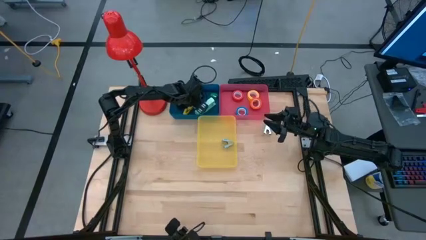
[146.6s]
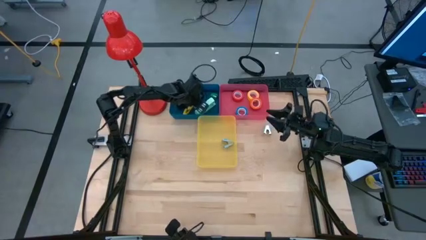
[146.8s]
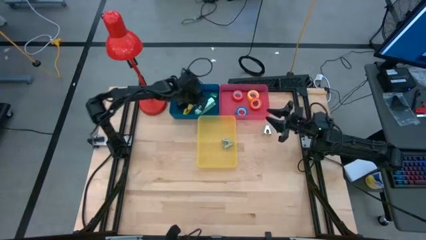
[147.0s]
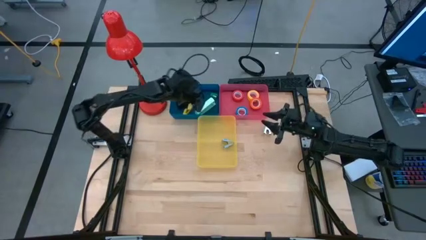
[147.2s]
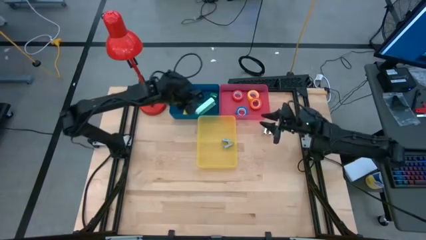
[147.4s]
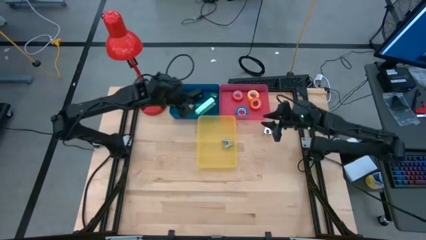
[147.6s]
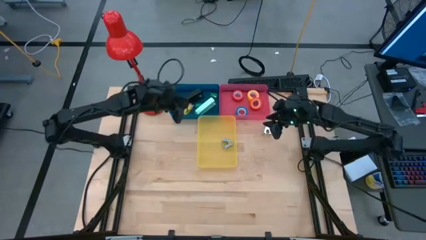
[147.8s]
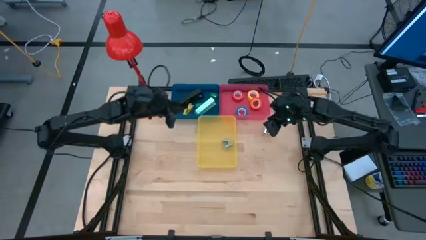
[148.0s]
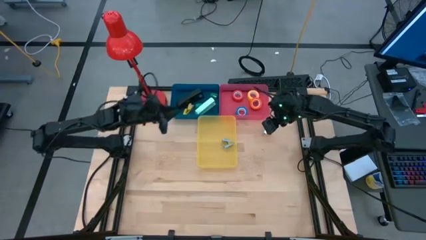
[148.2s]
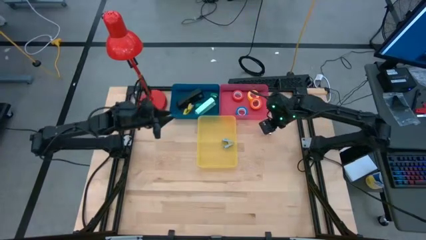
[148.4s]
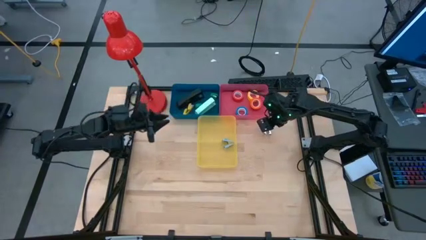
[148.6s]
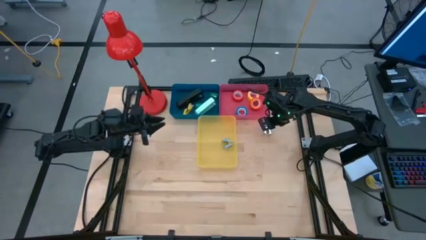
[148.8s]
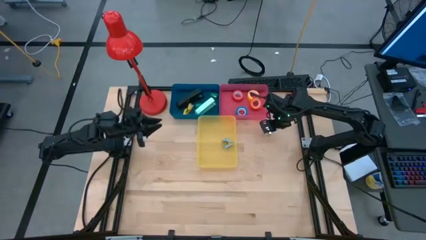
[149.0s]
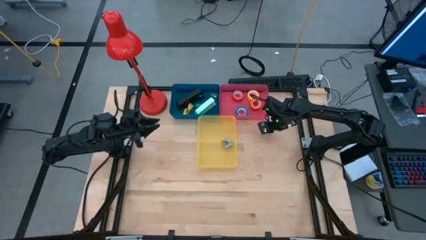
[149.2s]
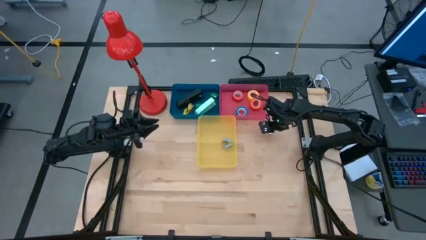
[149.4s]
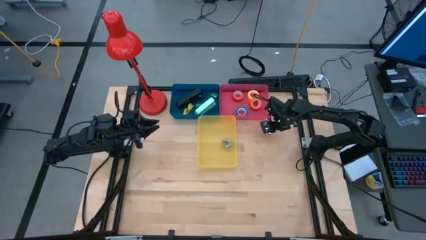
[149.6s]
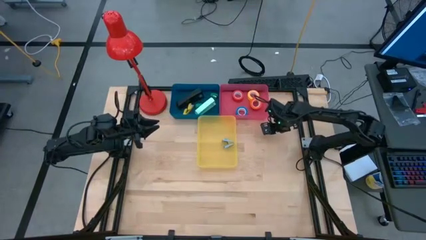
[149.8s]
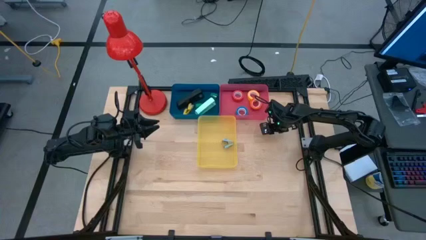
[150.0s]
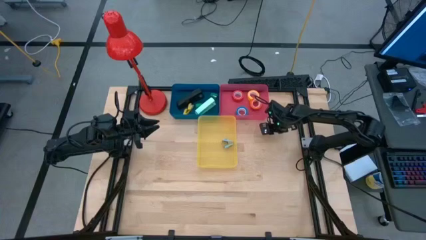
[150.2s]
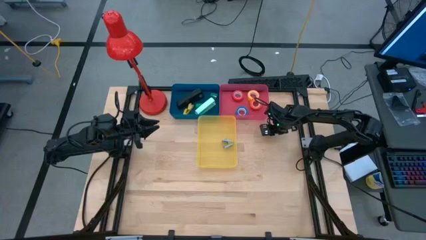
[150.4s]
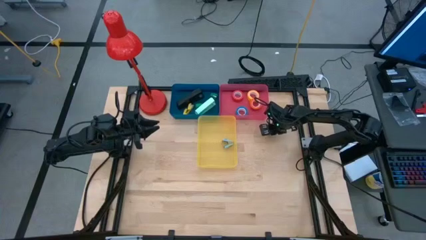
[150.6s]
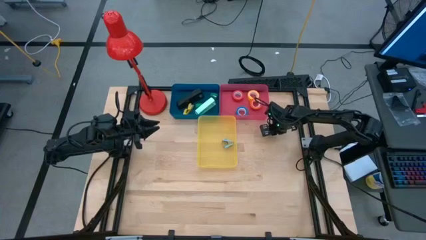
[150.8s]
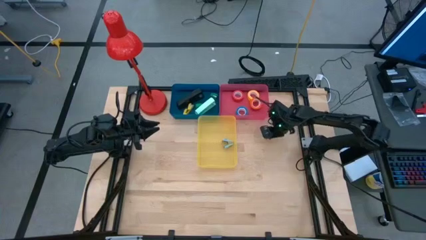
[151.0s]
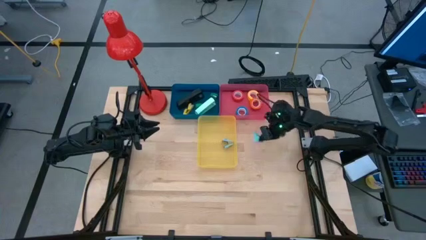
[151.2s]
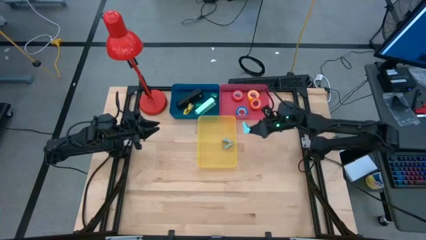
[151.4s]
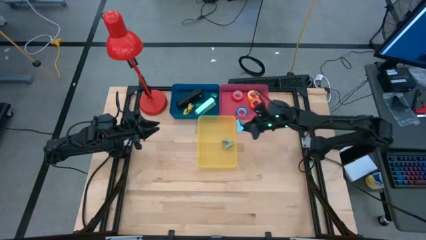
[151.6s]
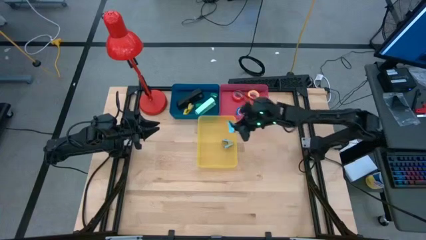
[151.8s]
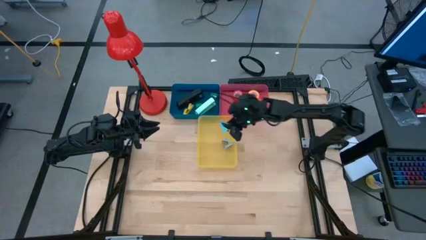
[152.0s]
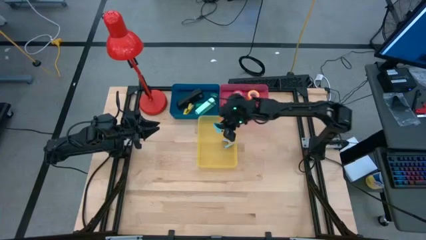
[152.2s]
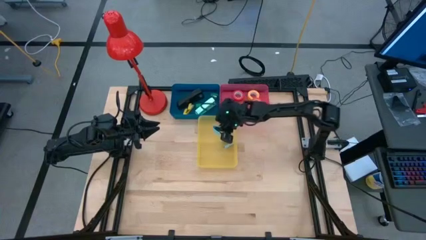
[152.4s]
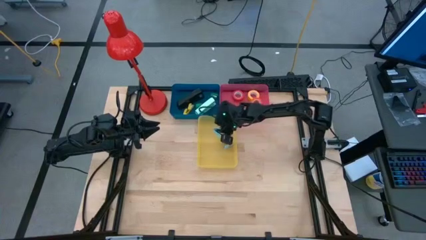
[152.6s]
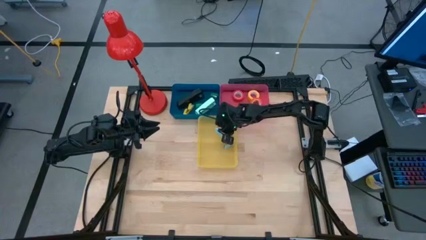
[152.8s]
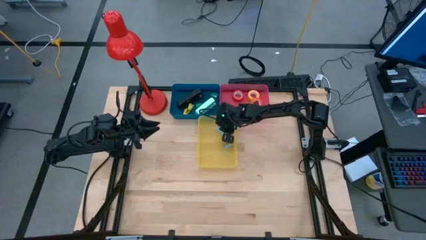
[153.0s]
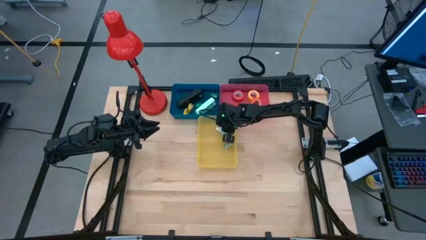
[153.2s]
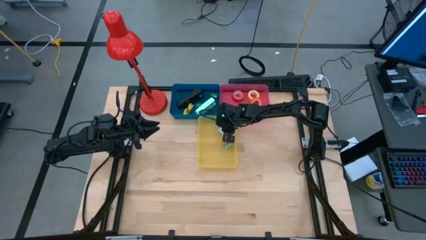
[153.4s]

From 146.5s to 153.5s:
Task: Pick and place Stapler, Stapler remover, tape
Put the light blue staple remover into the yellow bin

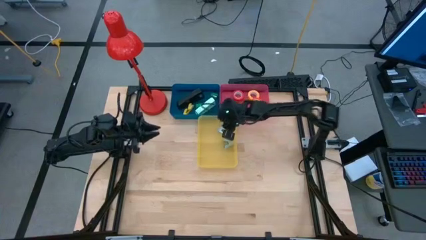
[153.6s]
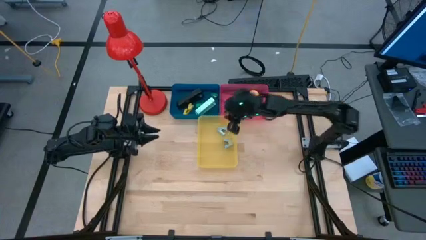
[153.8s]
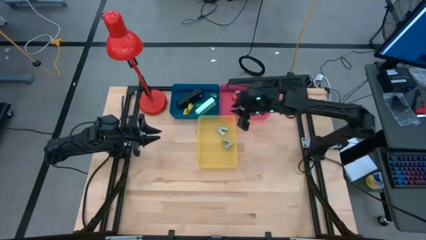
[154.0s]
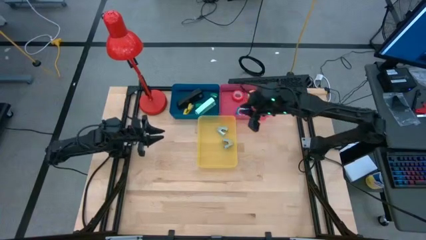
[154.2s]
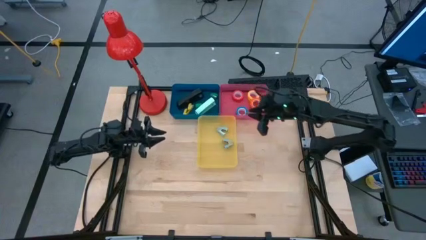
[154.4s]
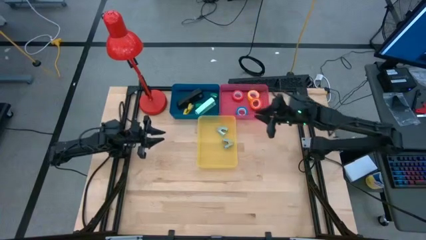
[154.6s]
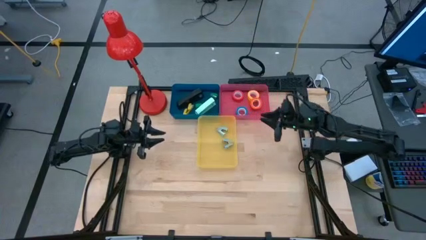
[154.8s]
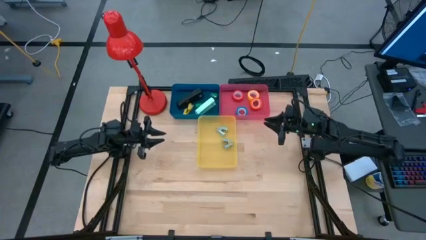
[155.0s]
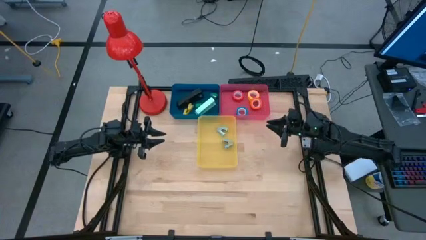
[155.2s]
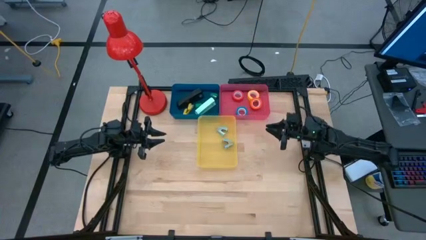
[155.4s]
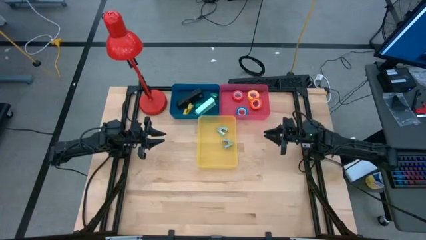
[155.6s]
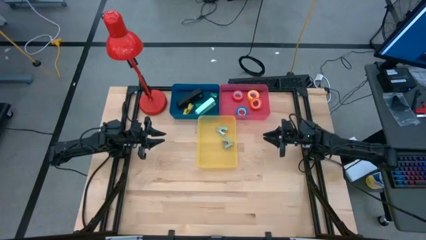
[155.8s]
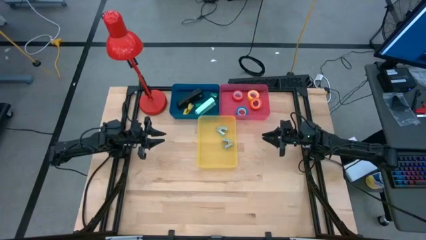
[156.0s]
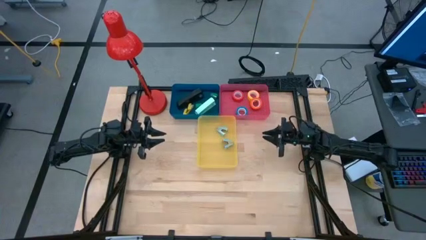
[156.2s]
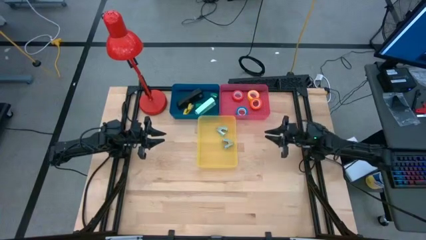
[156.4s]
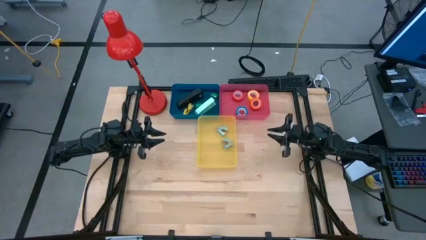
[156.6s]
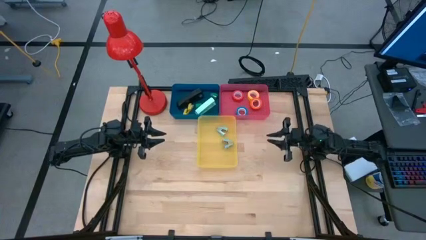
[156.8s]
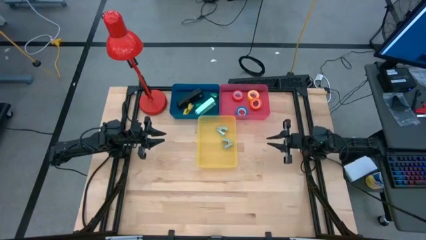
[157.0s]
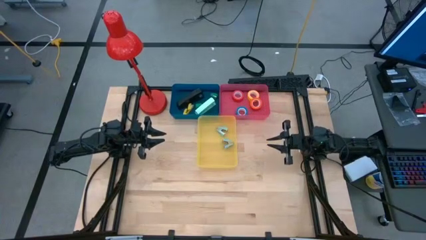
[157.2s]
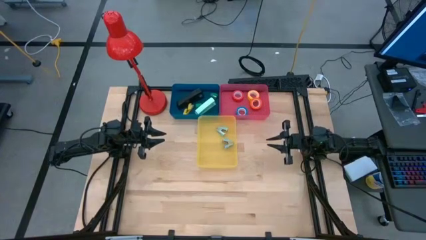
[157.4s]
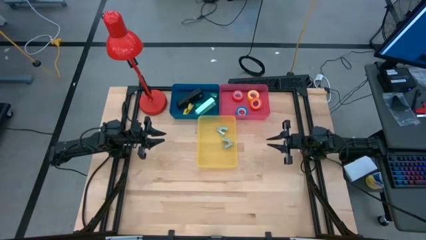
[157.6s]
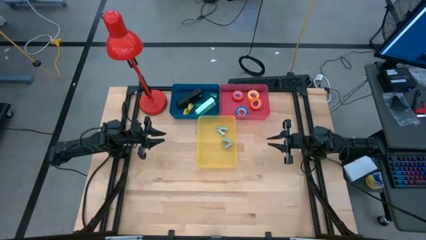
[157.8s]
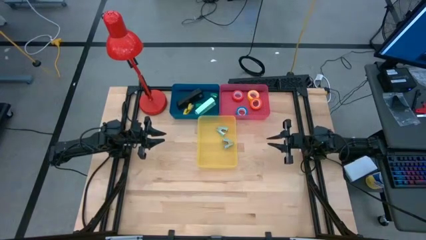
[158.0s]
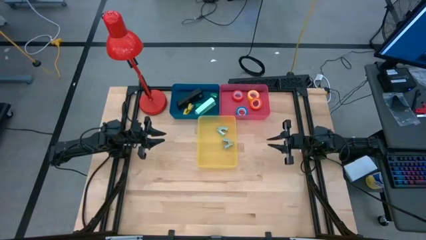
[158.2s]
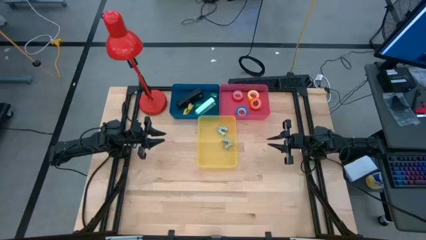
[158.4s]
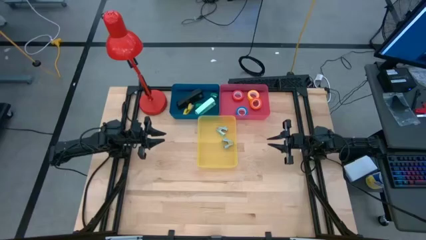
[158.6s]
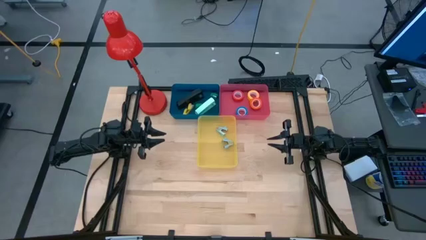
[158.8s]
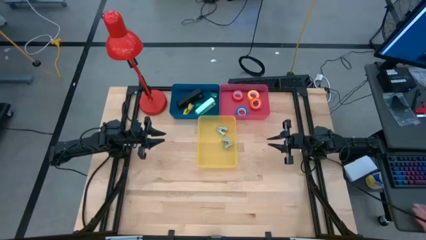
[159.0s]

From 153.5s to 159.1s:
Return to Home Position

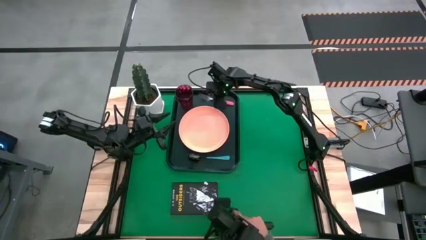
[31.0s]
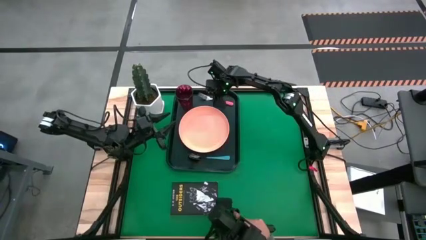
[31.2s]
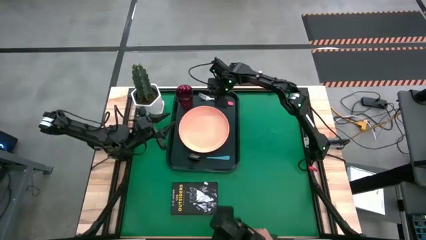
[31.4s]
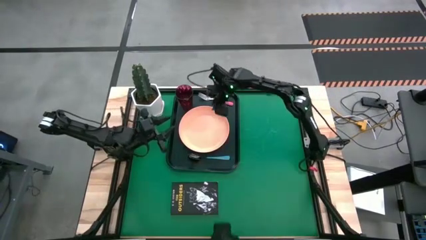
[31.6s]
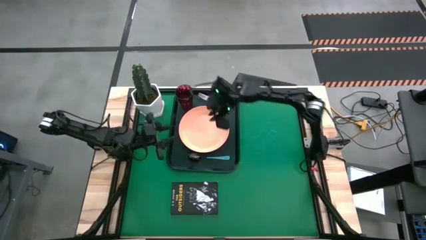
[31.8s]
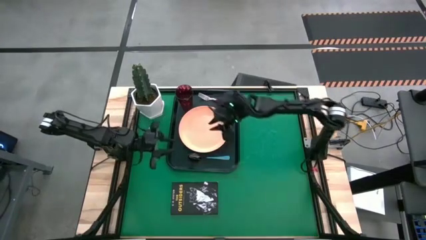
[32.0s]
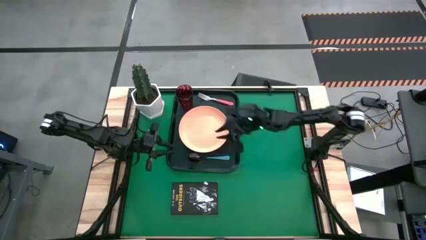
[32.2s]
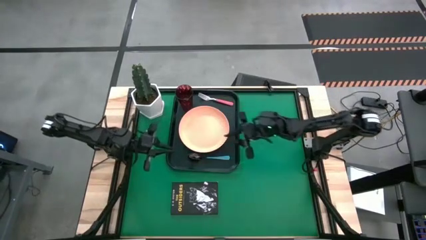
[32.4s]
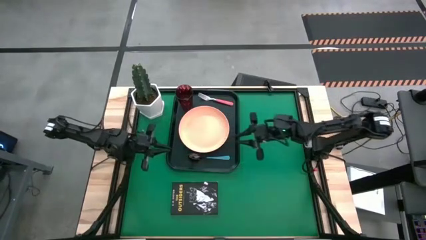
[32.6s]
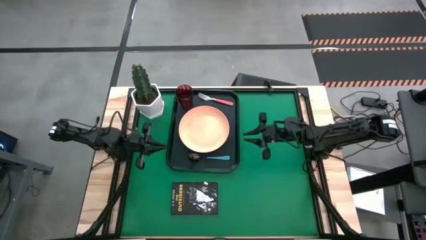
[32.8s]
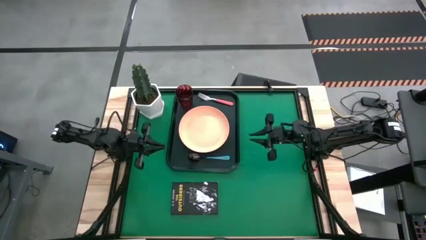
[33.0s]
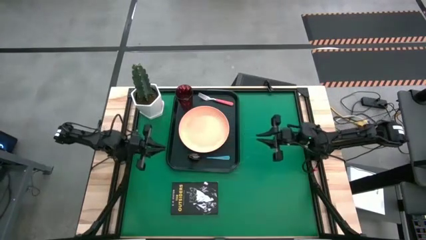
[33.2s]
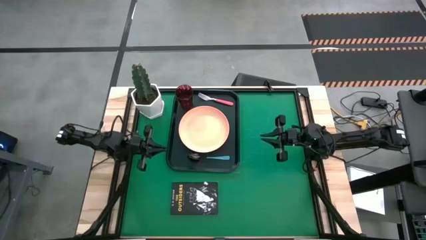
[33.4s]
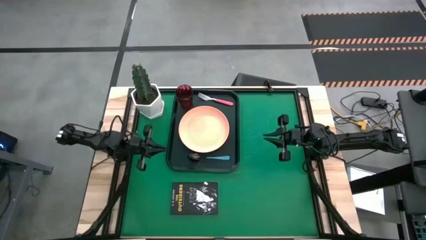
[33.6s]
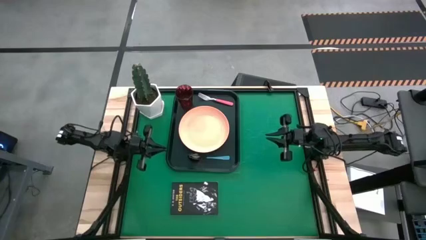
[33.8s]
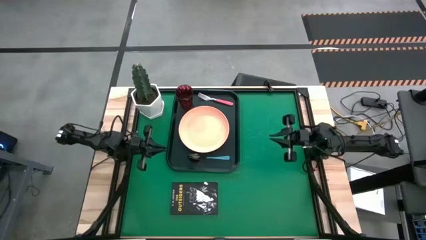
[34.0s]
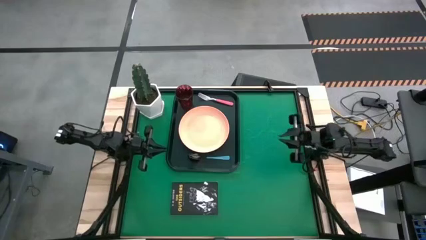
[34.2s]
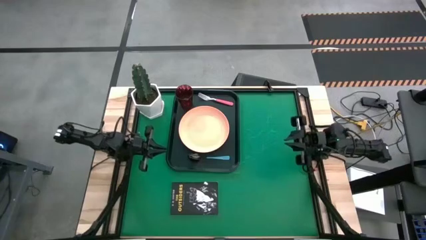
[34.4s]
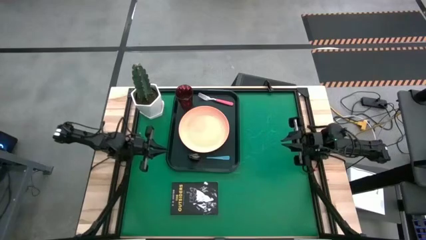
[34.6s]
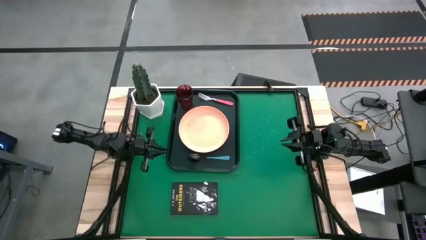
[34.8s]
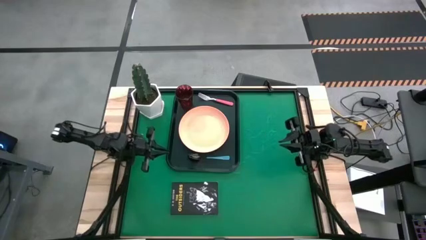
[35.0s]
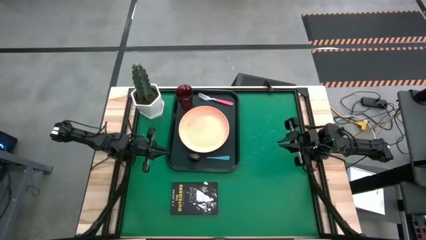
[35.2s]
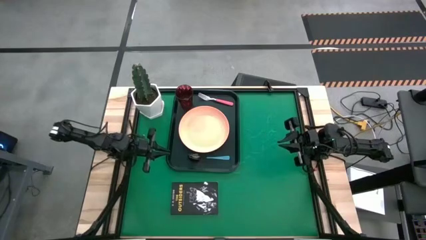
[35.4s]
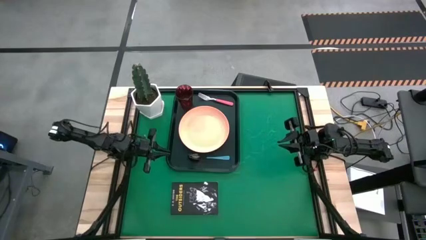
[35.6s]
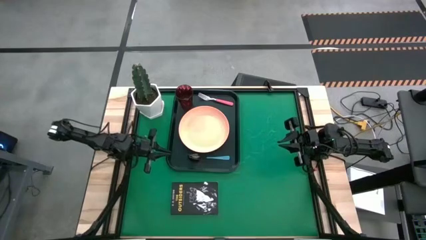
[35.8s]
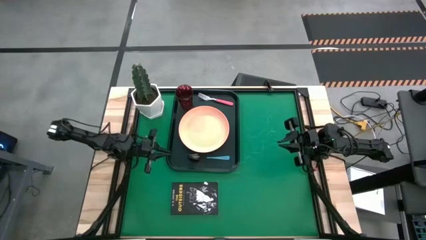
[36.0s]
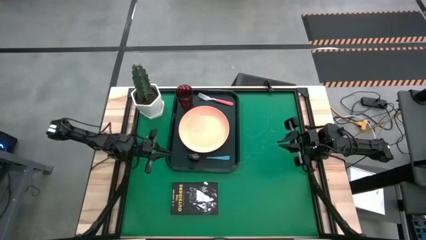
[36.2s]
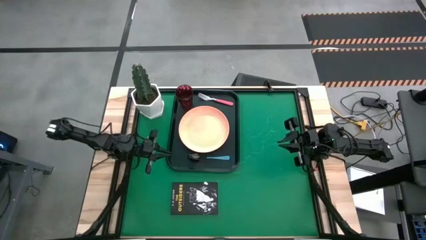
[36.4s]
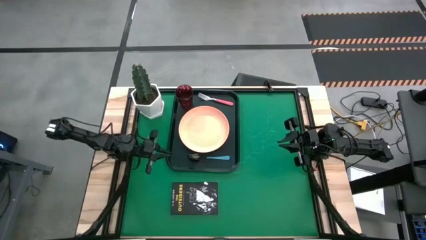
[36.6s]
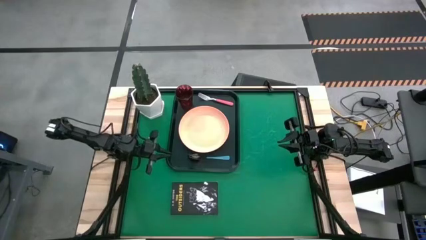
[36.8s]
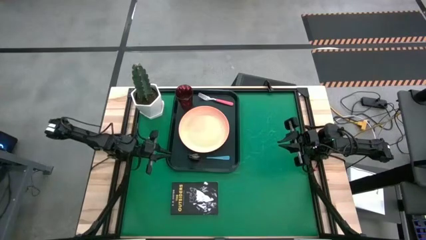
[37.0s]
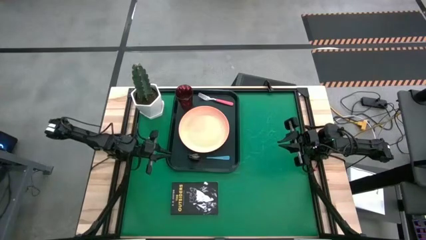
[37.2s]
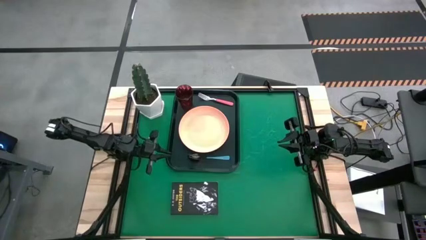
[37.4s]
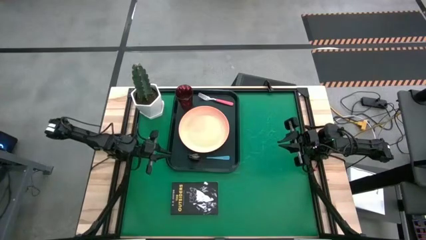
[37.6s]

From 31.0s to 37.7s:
Task: Pick and place plate/cup/fork/spoon on tray
Return to Home Position
